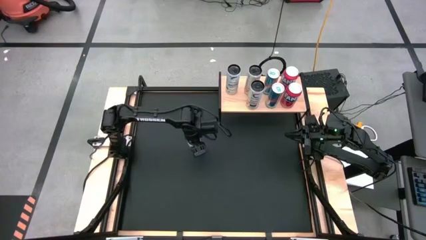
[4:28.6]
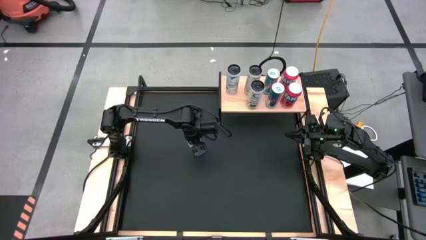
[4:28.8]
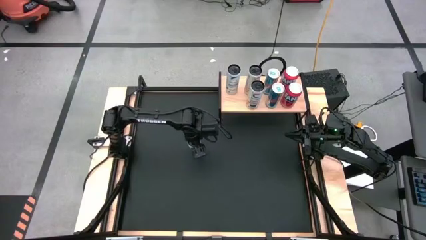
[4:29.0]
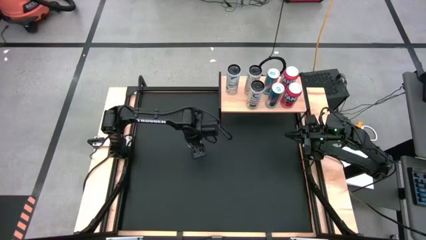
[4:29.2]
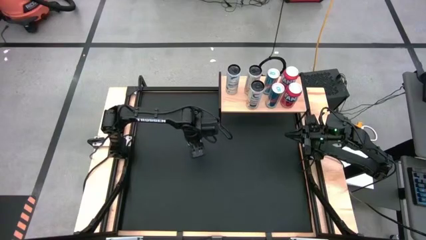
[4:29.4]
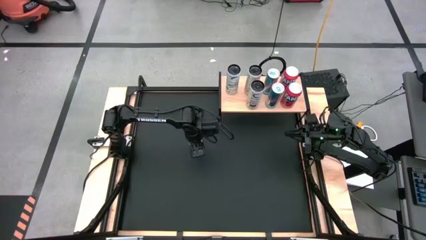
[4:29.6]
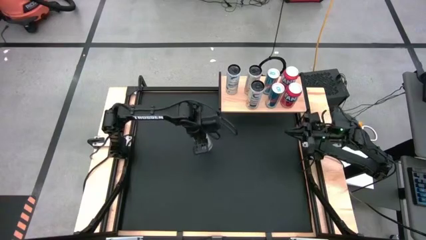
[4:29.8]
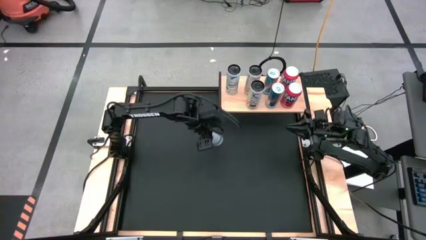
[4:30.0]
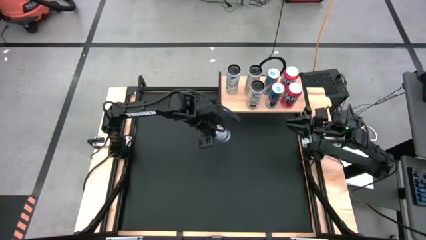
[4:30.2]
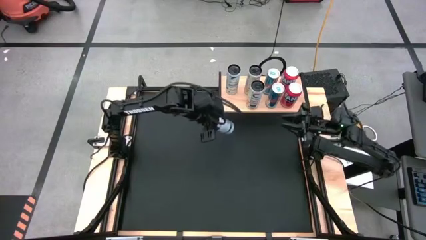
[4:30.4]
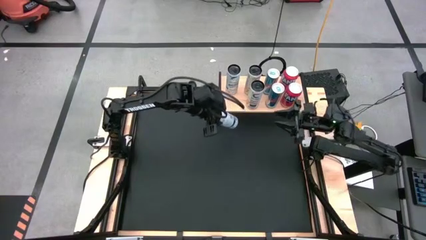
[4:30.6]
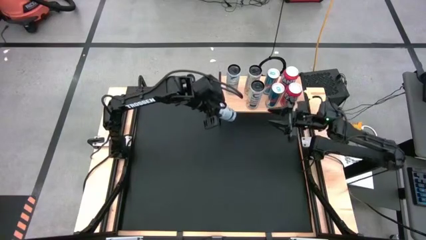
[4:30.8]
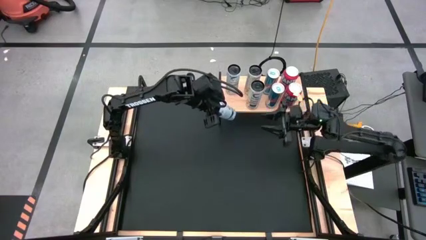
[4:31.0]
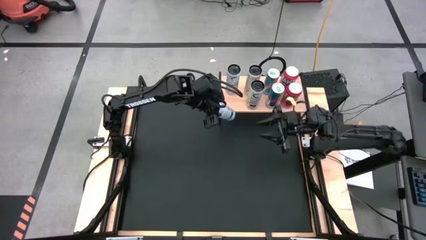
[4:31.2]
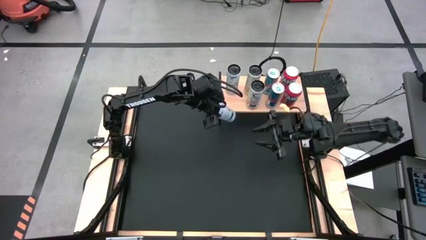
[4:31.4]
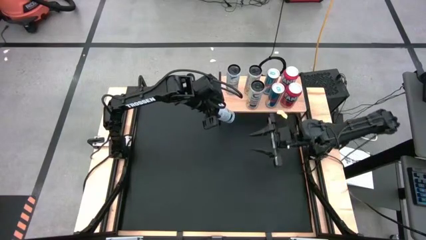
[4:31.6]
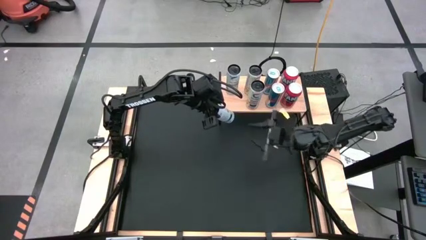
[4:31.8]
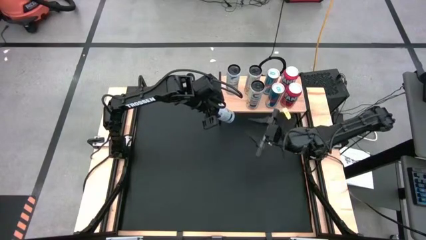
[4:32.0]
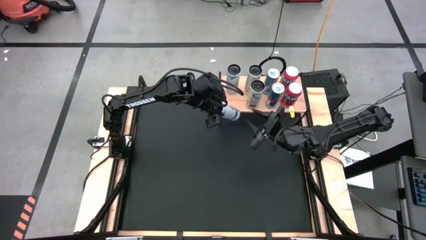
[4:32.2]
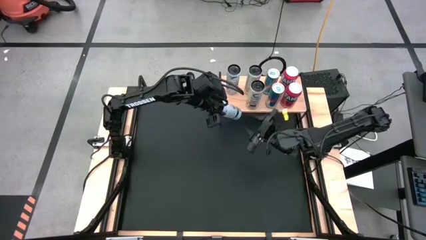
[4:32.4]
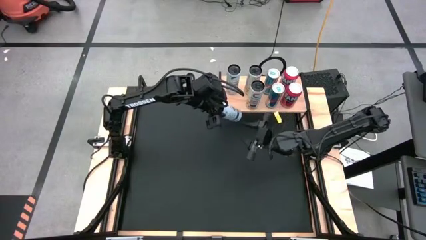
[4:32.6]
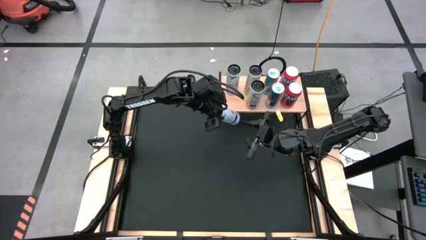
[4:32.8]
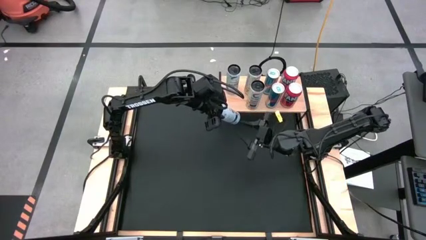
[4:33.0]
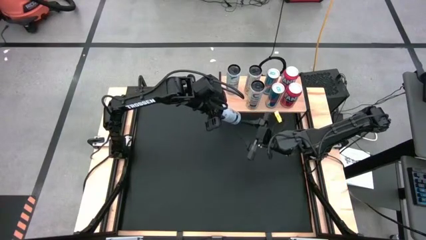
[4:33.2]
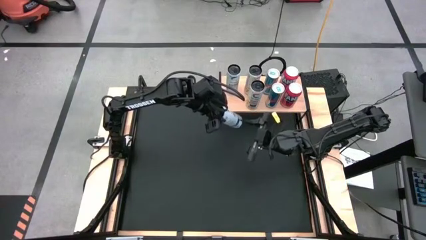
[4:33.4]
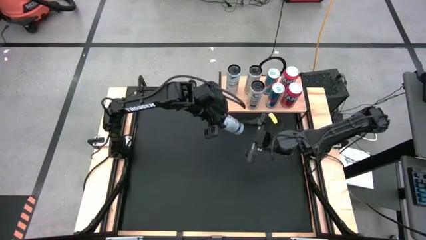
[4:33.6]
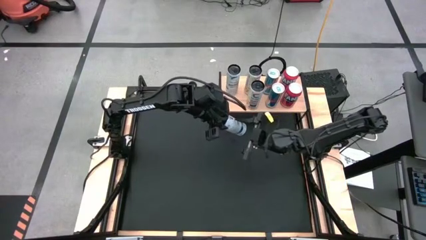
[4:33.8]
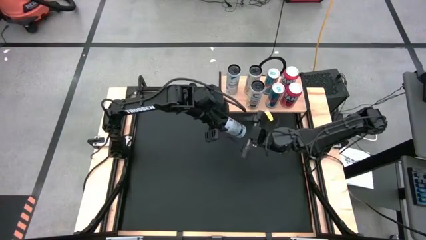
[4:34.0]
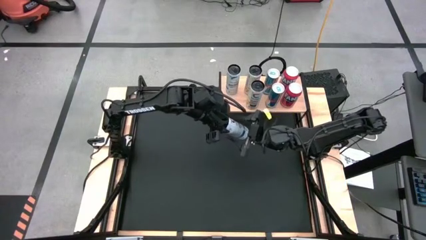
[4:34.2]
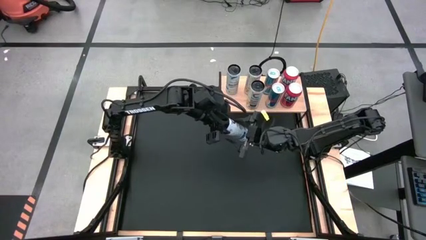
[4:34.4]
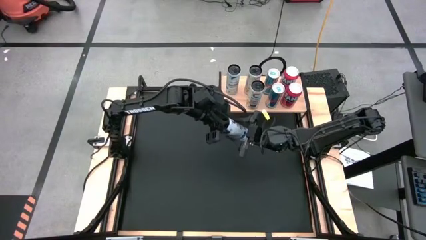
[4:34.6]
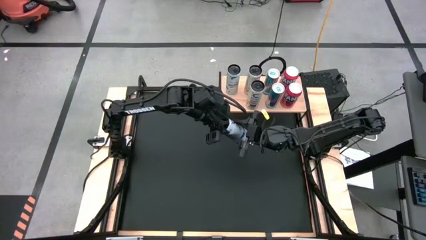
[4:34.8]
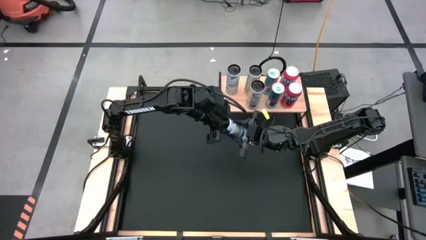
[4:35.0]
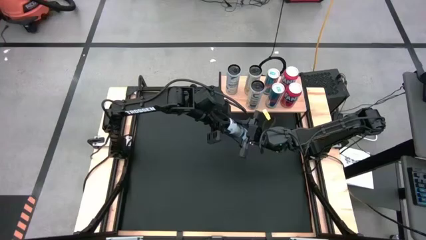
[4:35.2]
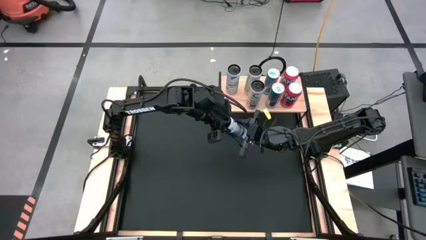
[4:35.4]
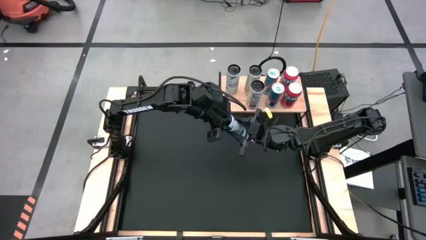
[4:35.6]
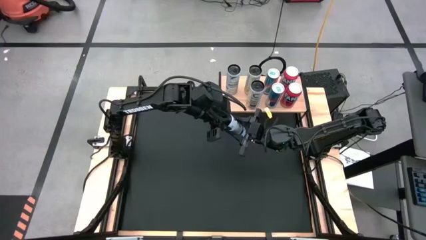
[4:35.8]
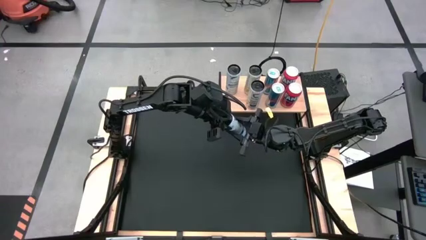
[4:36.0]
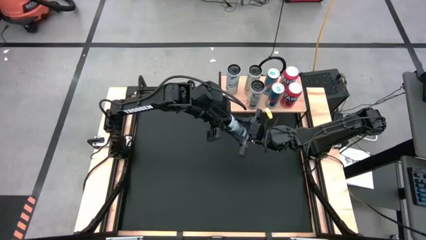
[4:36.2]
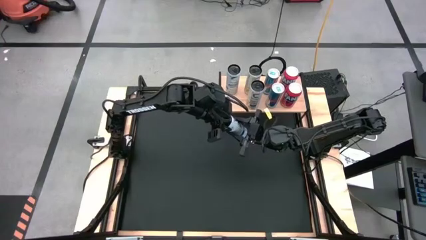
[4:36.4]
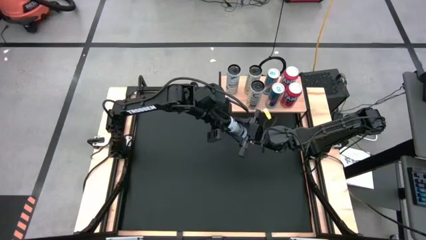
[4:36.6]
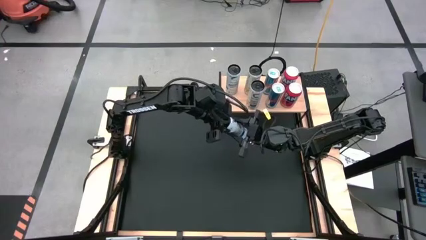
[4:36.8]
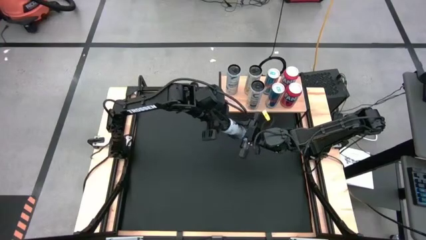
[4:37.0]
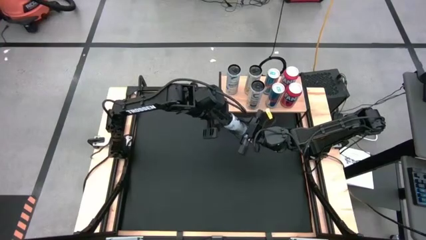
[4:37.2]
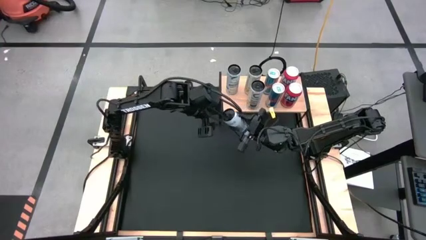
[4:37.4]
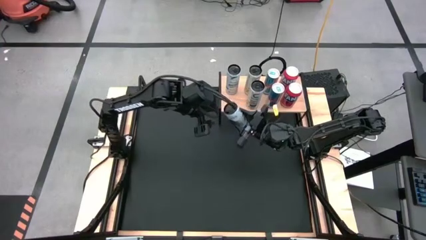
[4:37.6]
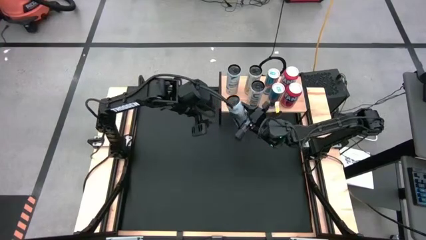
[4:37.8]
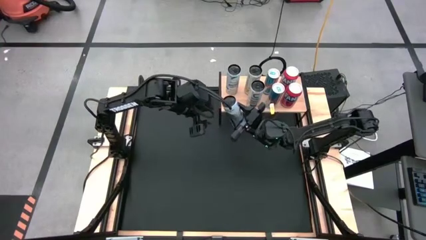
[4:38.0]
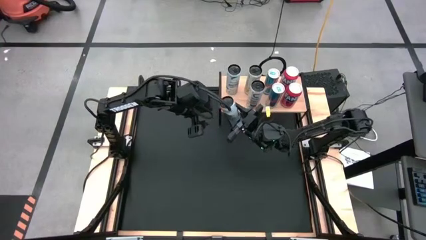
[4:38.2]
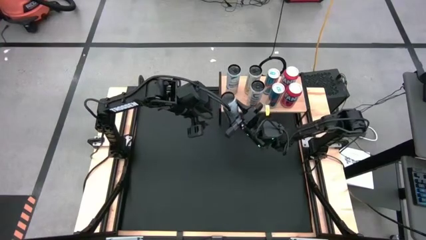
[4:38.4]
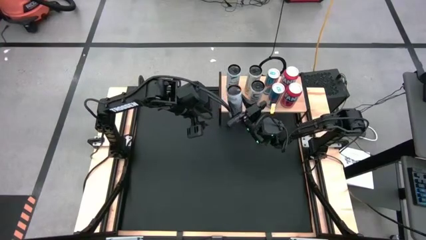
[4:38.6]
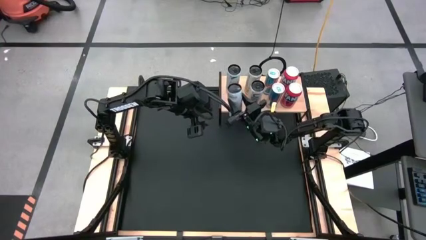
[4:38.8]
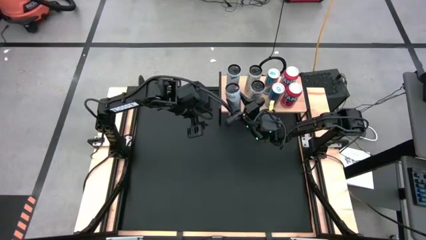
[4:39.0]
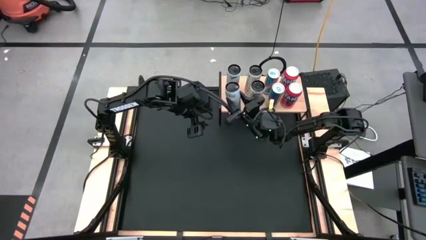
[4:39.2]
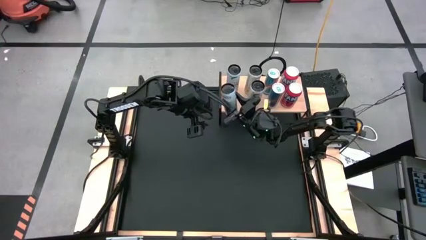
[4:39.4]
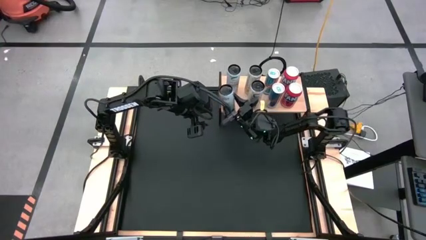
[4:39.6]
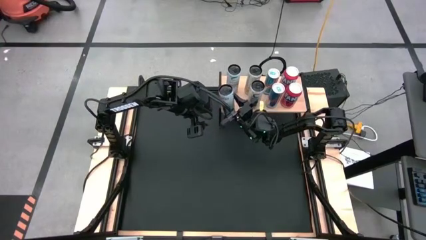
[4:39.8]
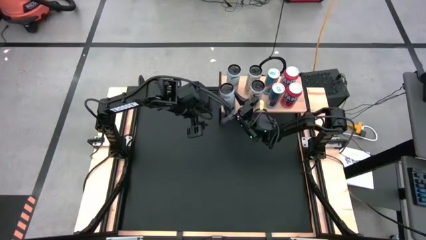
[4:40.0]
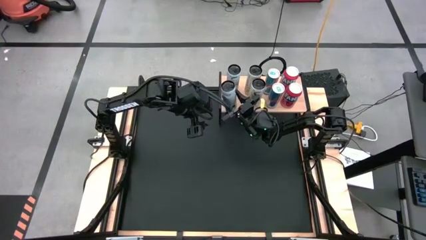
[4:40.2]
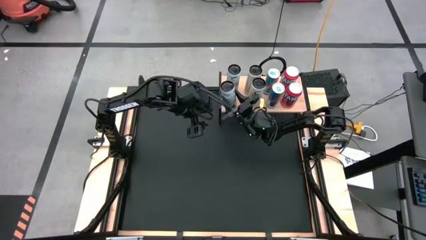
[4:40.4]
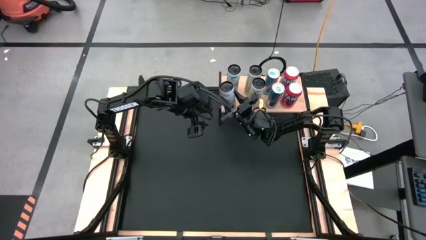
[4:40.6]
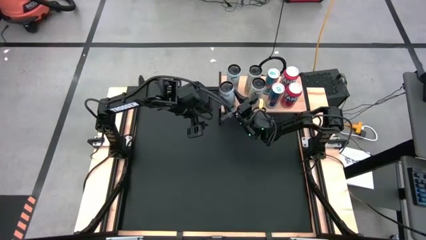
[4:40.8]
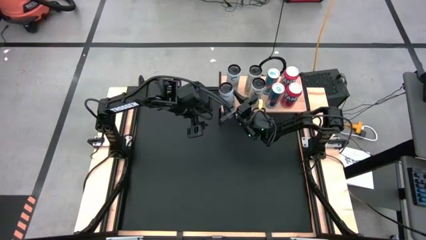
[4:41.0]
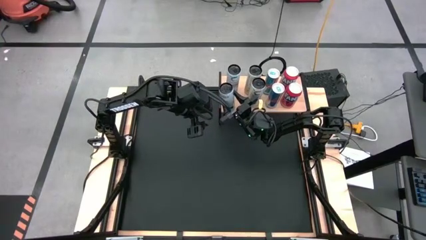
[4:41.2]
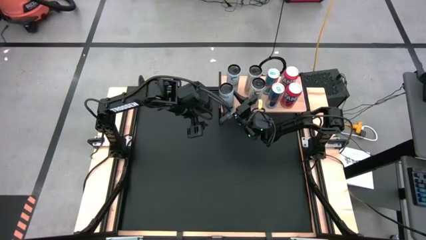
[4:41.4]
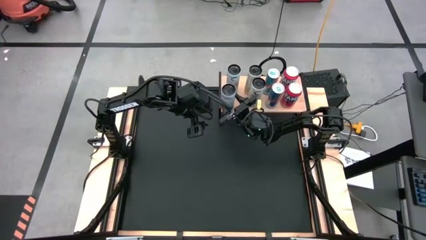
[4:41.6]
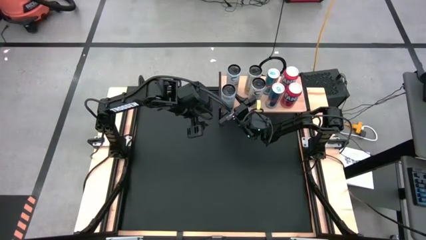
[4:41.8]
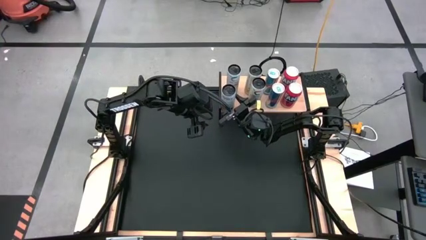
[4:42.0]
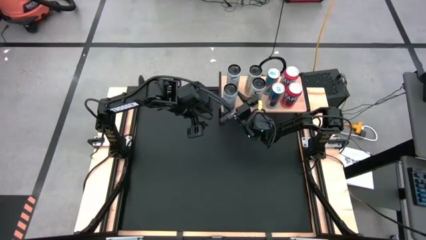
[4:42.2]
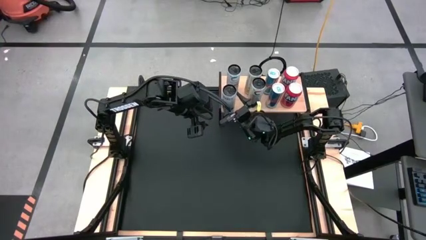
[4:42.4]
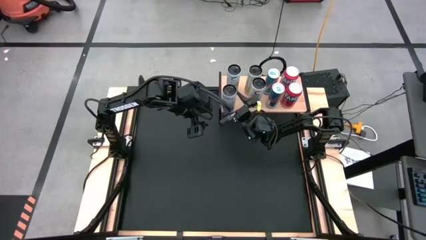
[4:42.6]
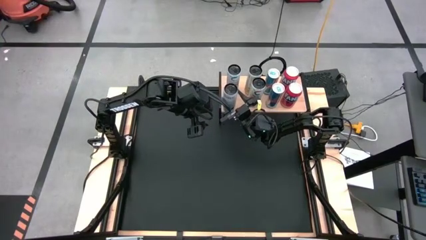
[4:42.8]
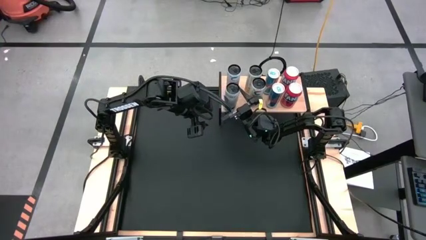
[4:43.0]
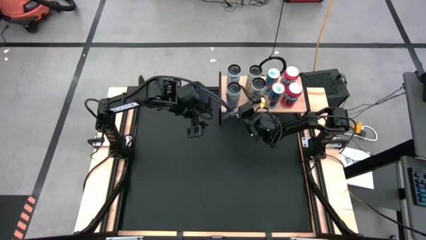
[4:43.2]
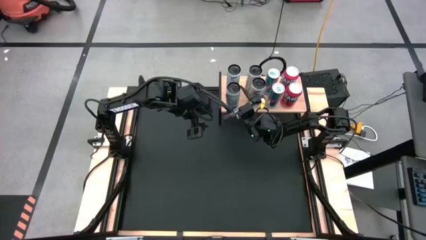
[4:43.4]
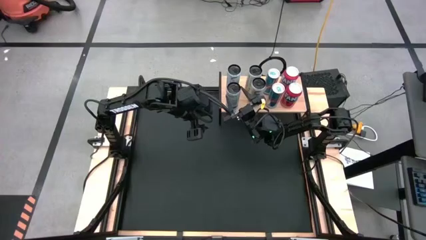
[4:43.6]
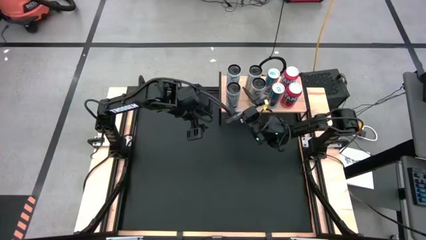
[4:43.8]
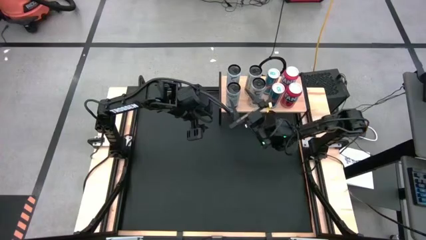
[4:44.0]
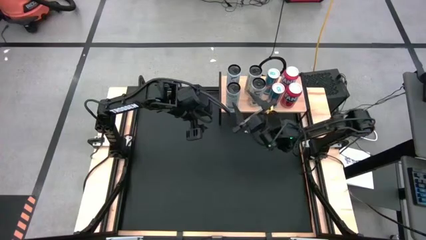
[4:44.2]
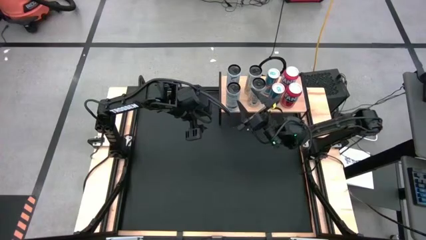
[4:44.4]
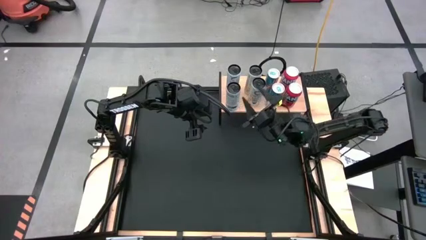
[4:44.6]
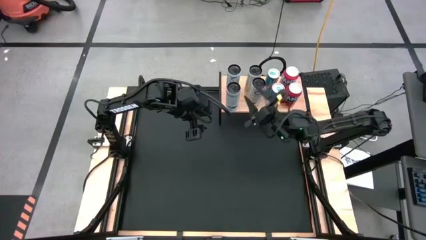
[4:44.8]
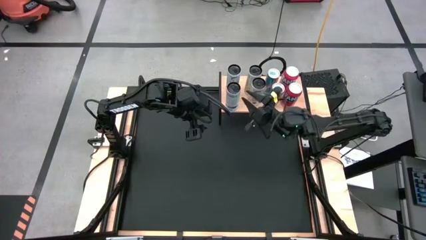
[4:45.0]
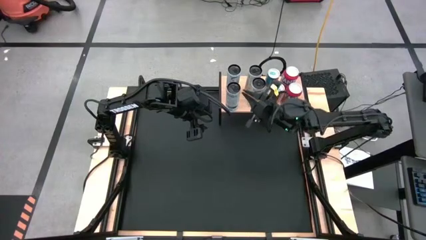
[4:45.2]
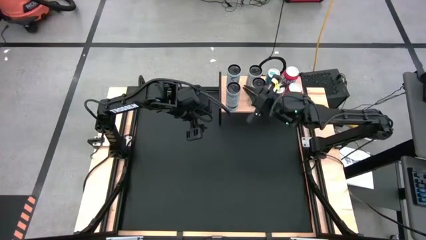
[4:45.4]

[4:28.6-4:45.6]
Task: Place canned beverage on shelf
Put the white blue soda can on the shelf aligned with the white blue soda can
